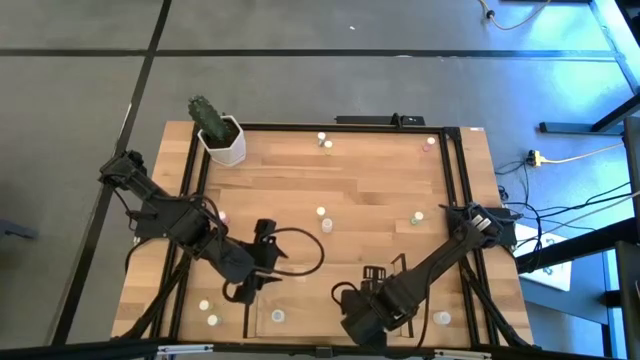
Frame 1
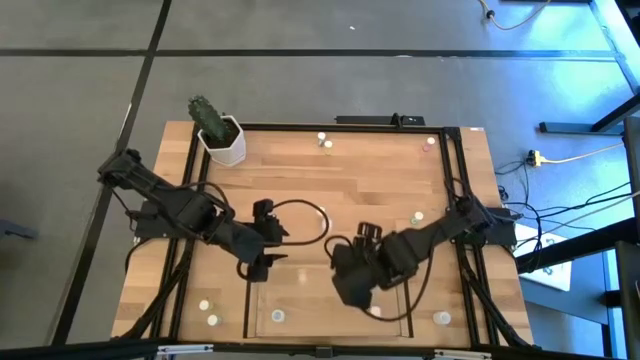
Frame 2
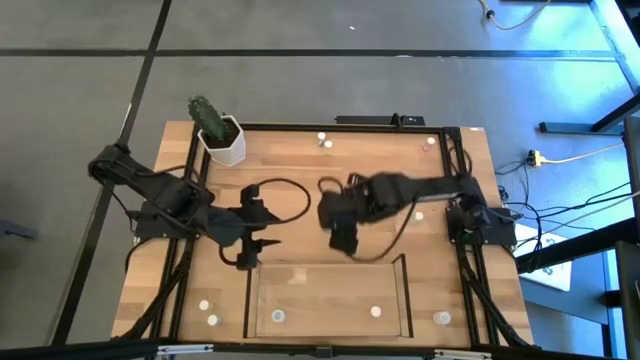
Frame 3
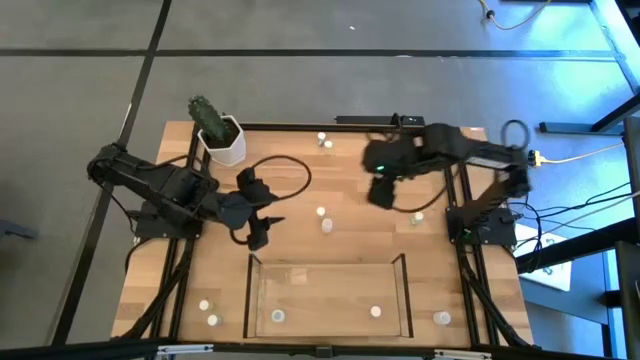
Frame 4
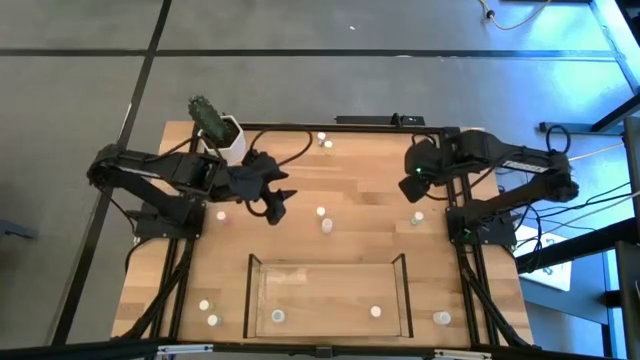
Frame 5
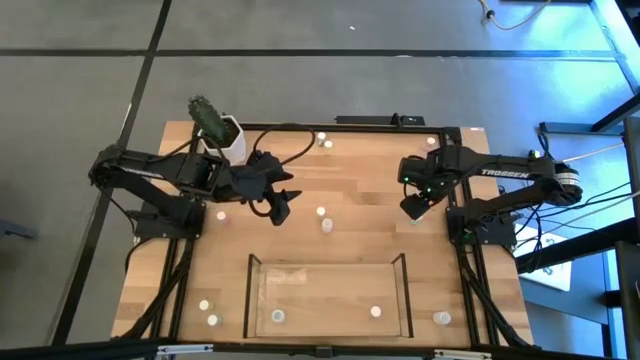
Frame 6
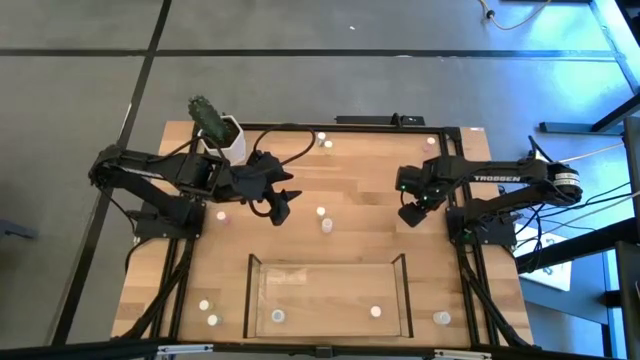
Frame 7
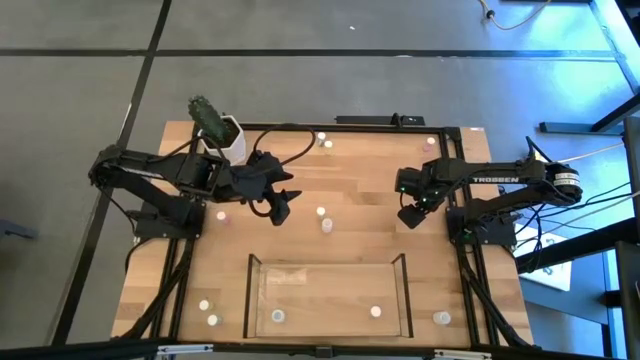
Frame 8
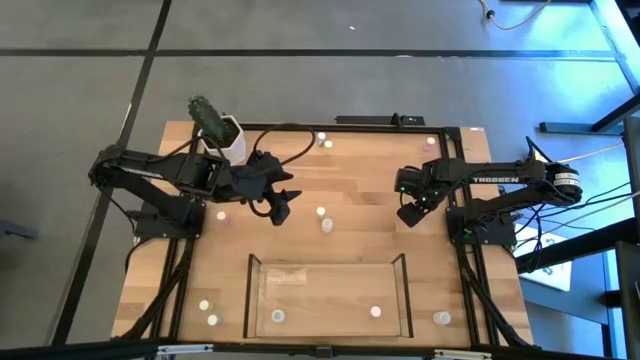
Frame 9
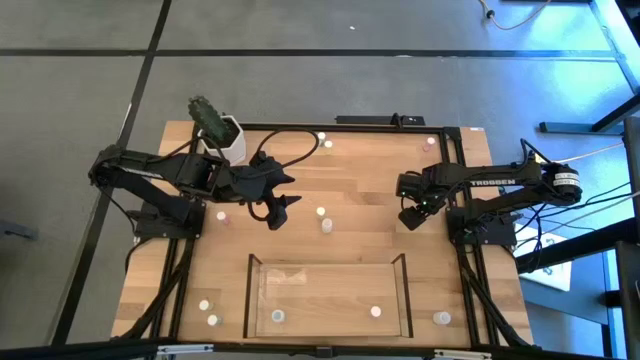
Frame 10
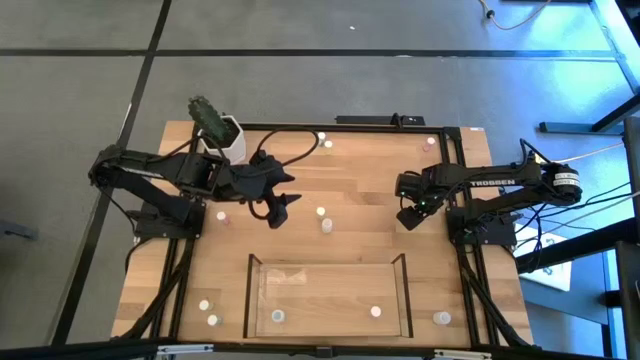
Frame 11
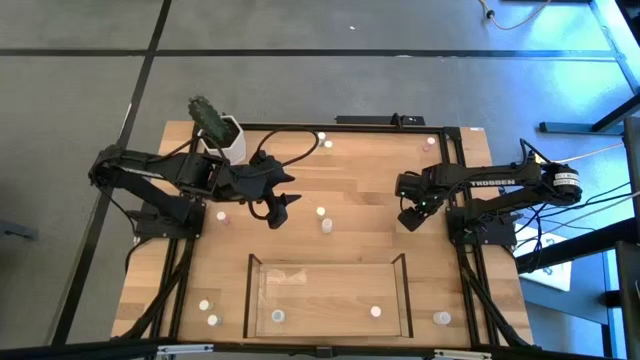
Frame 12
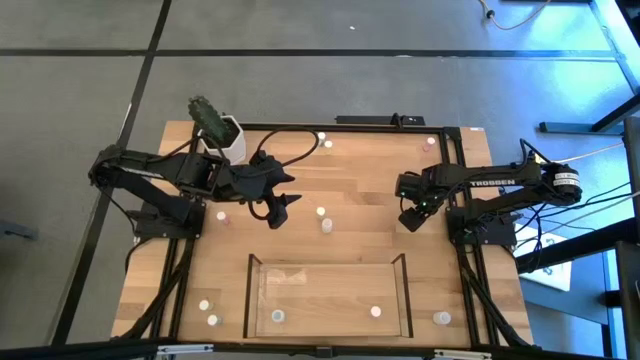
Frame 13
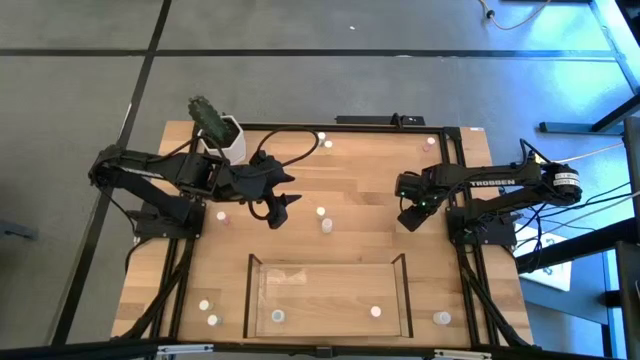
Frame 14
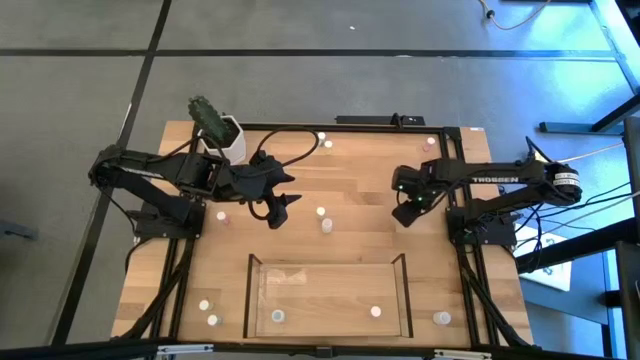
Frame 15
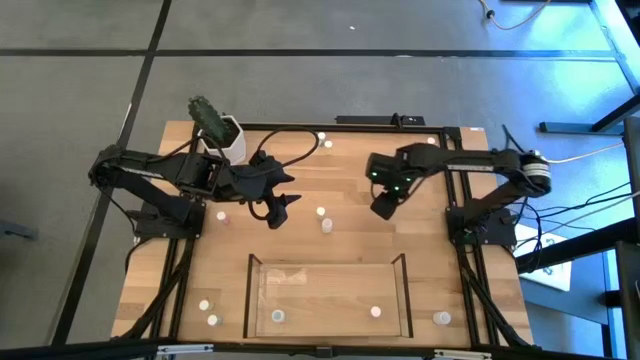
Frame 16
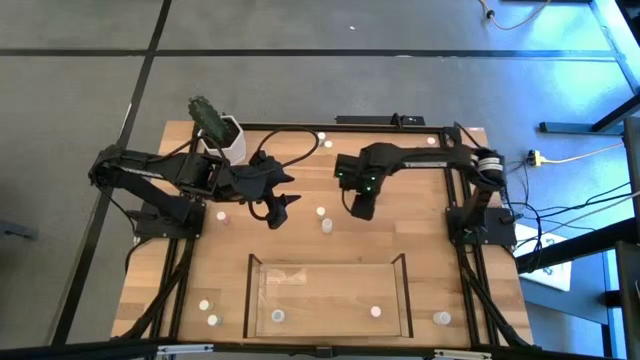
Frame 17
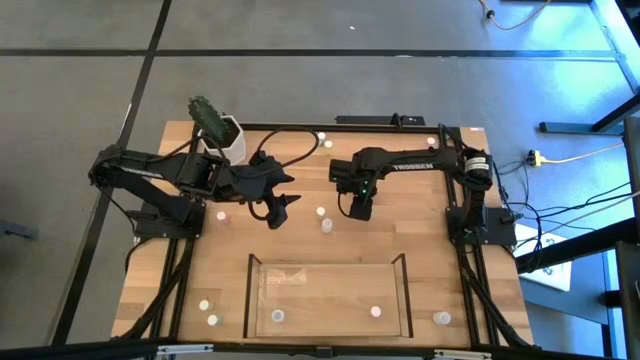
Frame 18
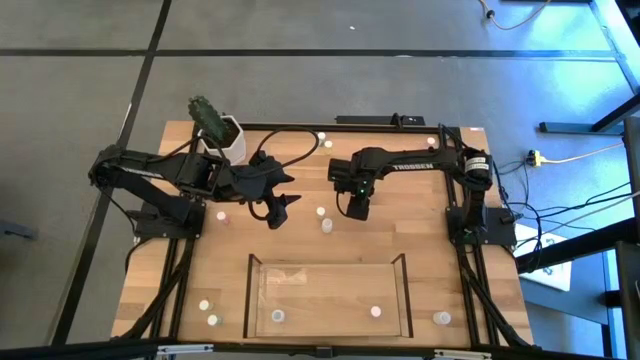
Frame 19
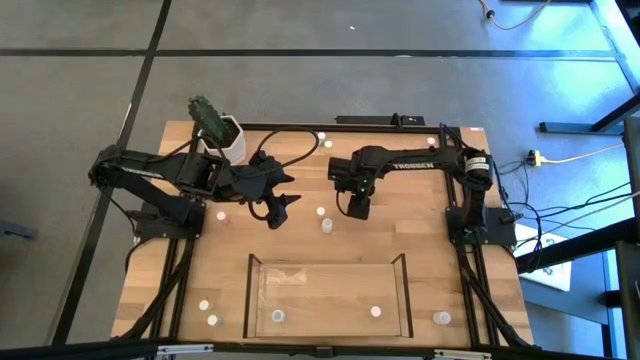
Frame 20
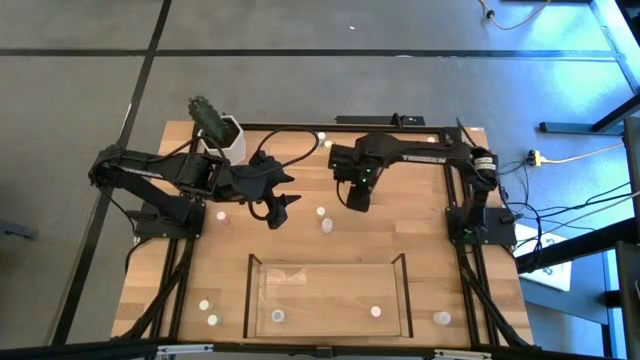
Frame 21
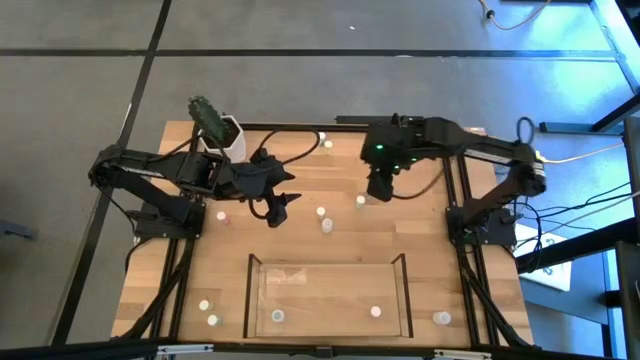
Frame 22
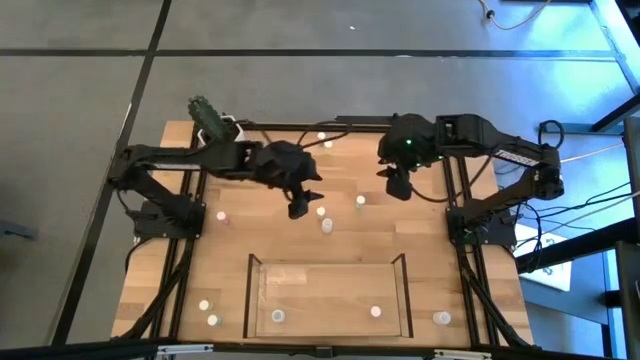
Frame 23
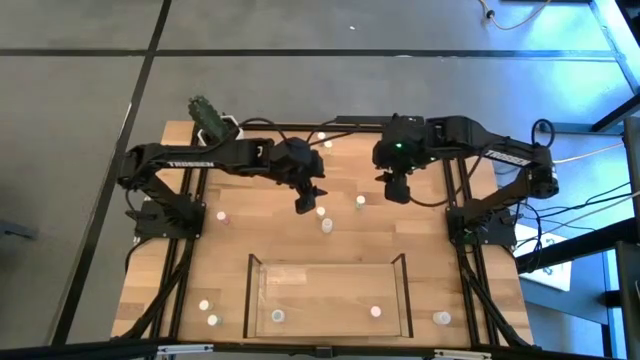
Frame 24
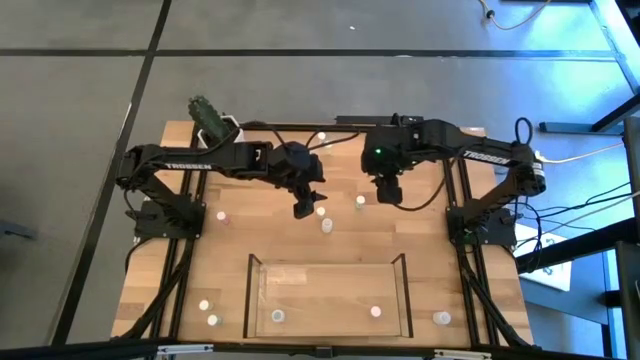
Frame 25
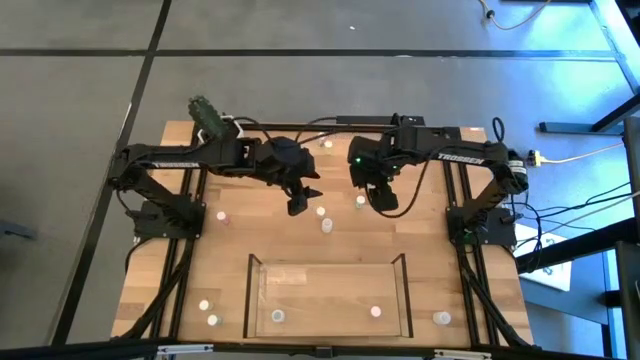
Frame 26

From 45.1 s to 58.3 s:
Task: Pick and place medicine bottles onto shelf by color
Put the right blue pill bottle on the shelf

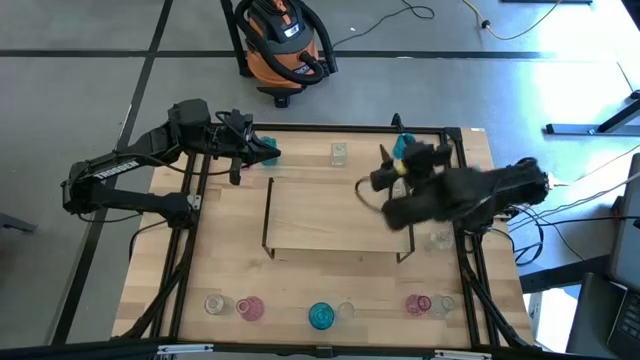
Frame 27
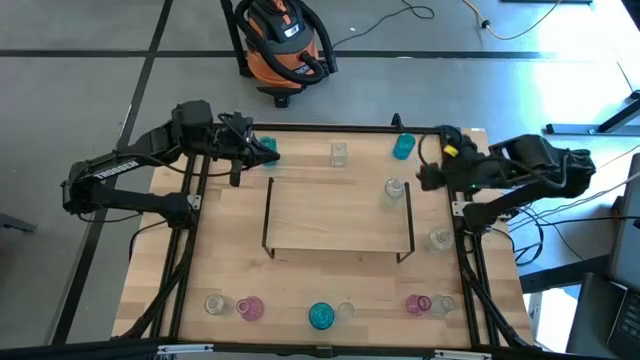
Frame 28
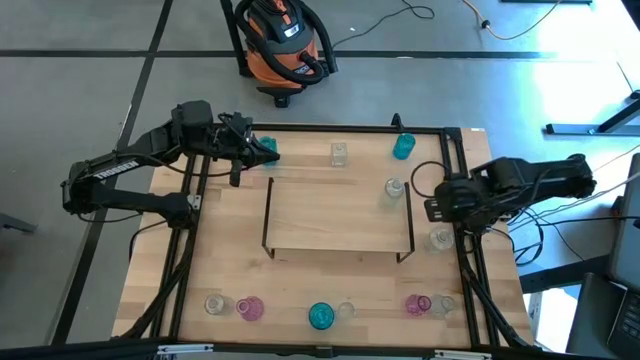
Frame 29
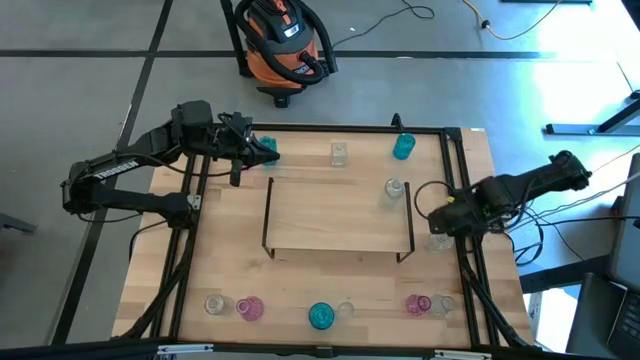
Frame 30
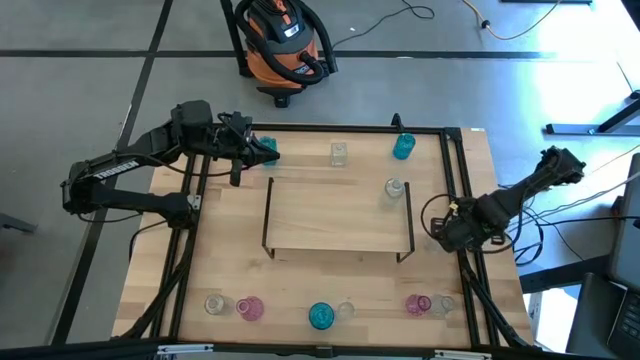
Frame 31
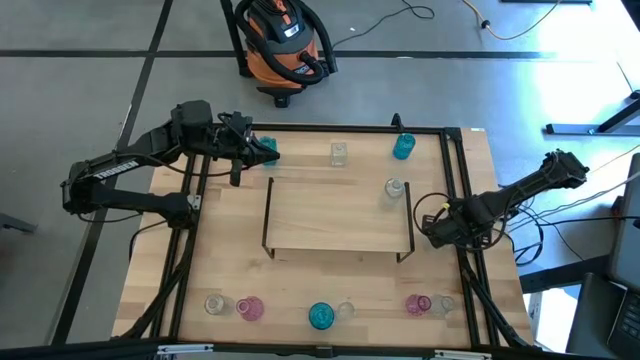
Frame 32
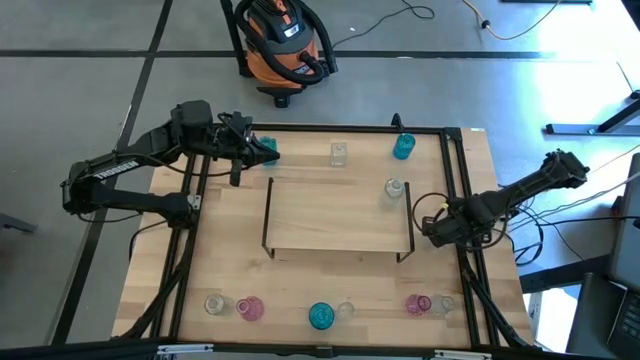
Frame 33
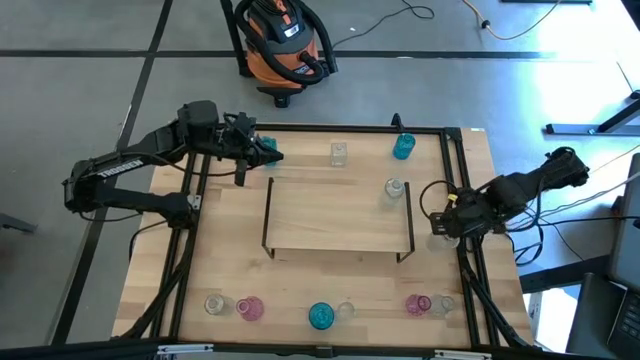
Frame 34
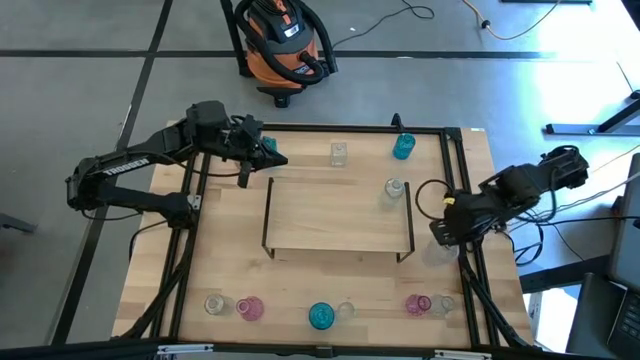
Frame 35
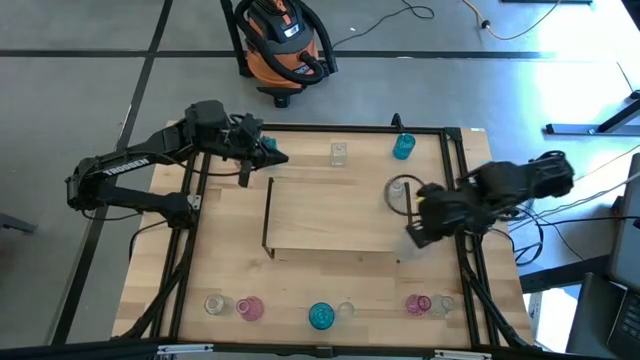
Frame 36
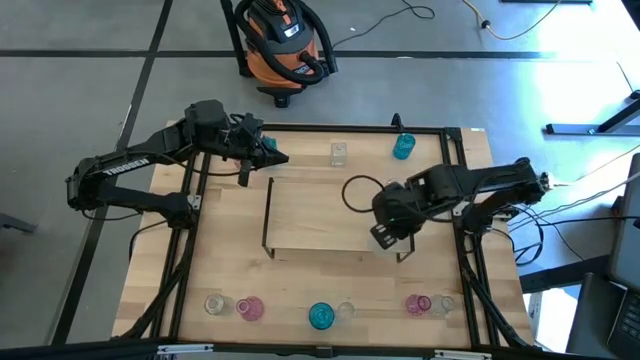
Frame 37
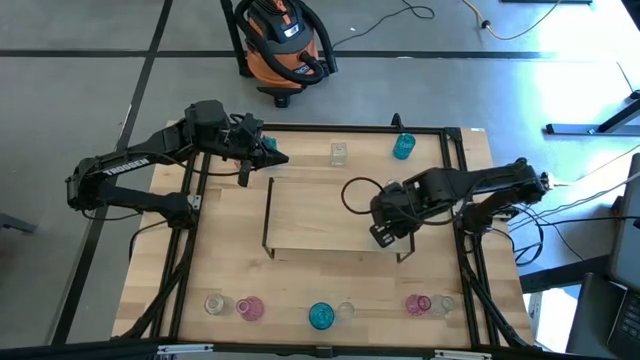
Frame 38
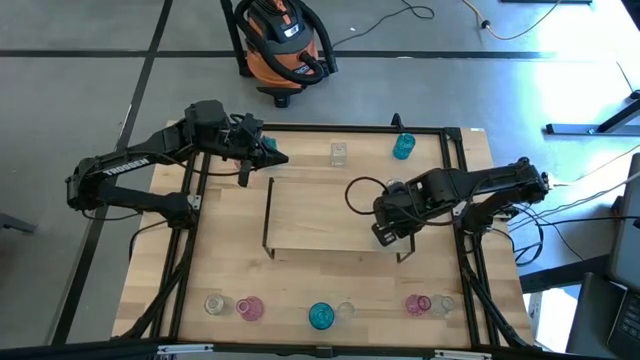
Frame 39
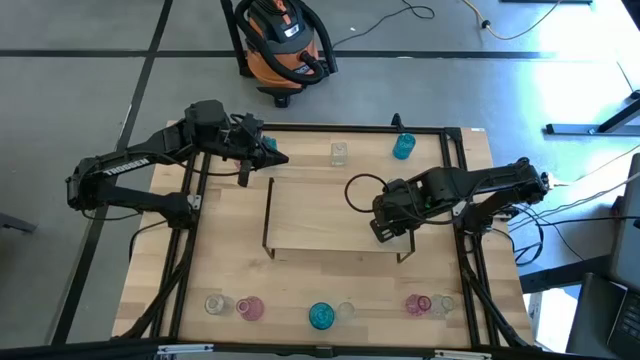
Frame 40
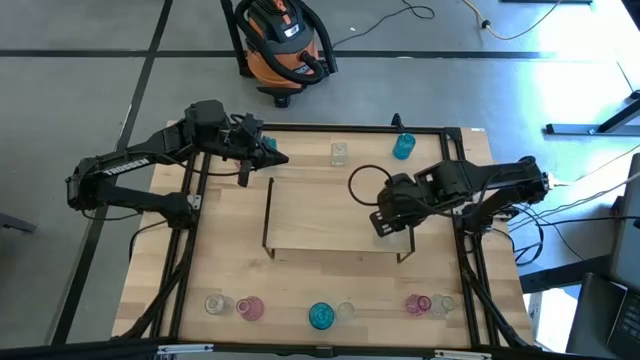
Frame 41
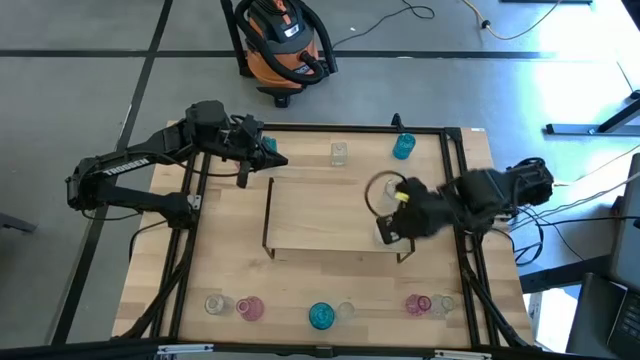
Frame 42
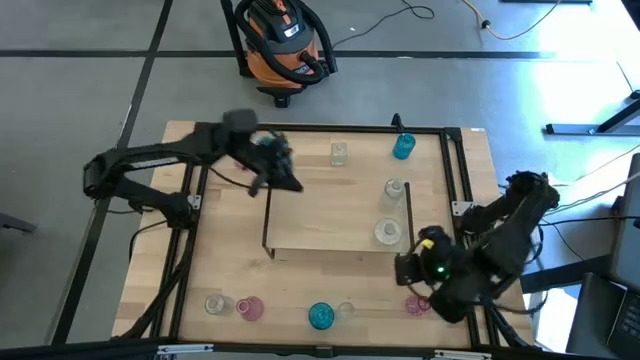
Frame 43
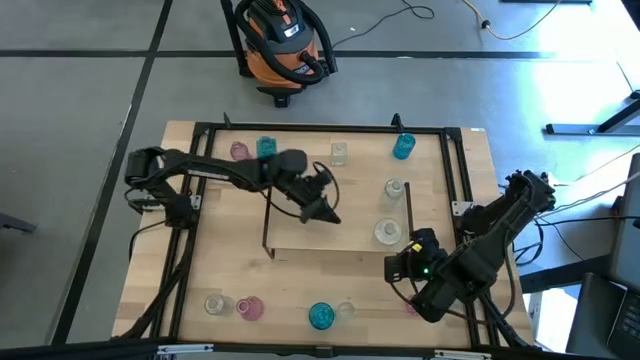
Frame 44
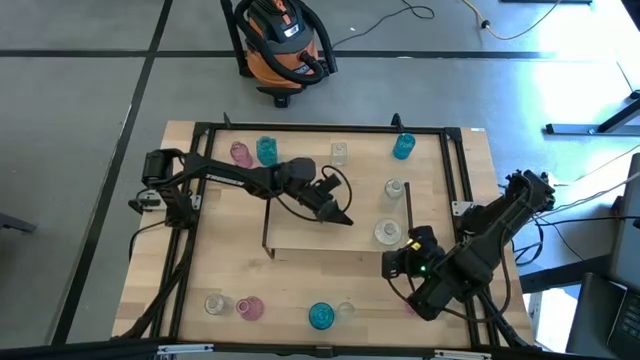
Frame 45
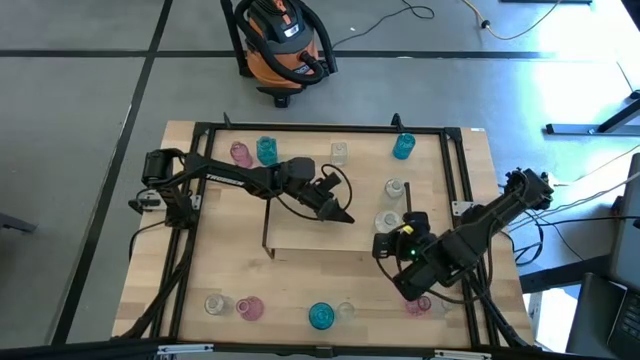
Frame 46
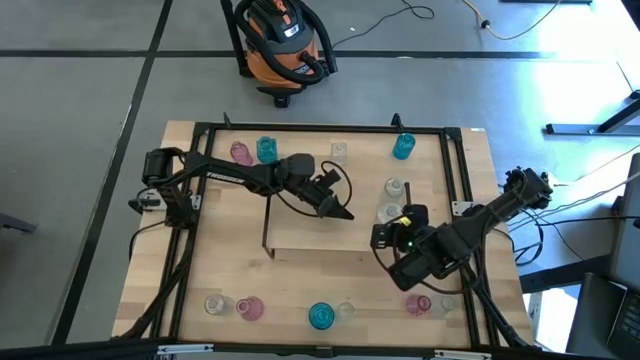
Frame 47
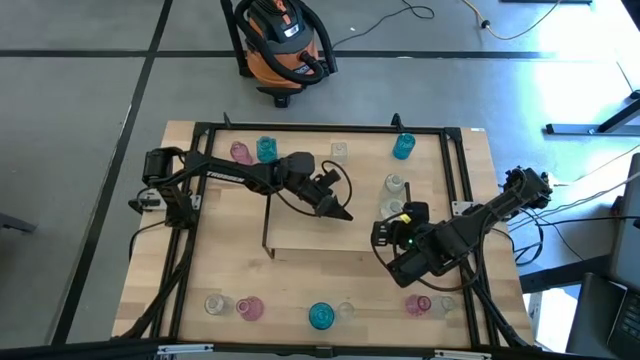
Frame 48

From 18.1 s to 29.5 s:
Task: sort vases onto shelf
Put the transparent vase on the shelf aligned with the other transparent vase
